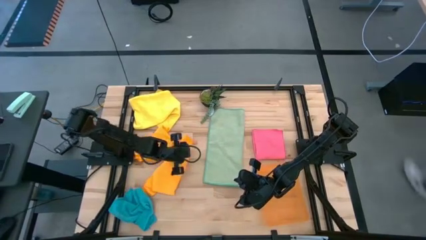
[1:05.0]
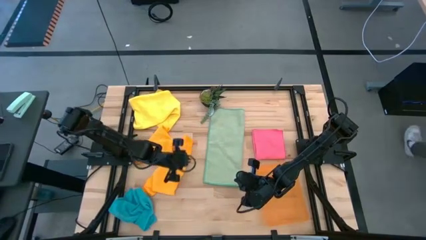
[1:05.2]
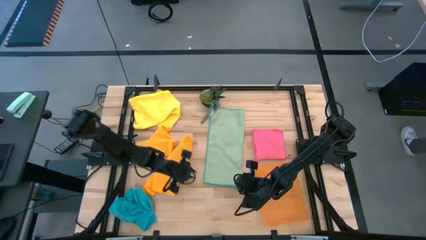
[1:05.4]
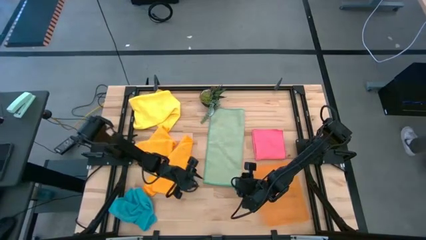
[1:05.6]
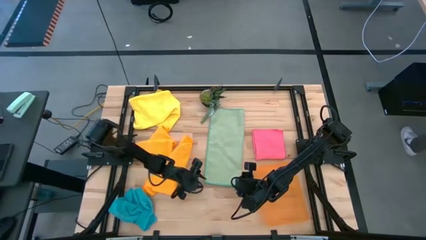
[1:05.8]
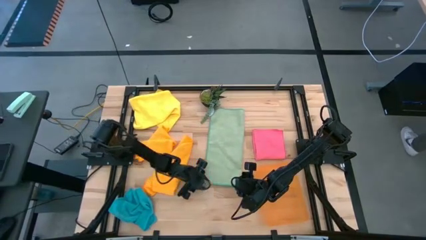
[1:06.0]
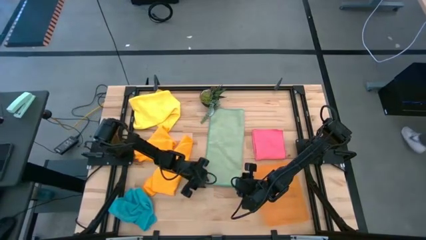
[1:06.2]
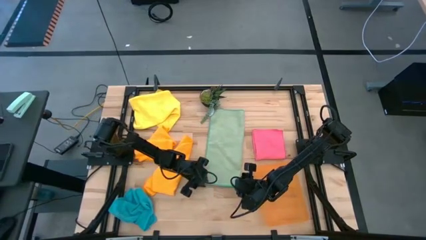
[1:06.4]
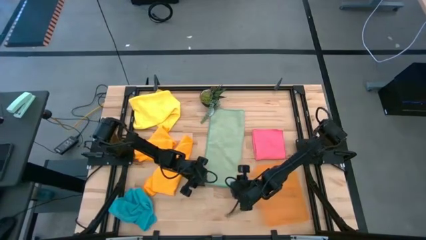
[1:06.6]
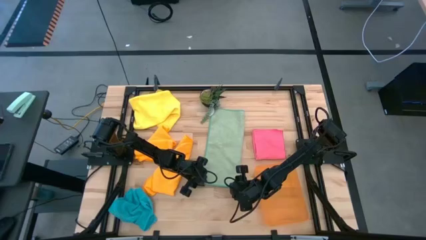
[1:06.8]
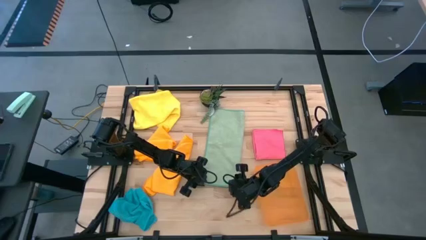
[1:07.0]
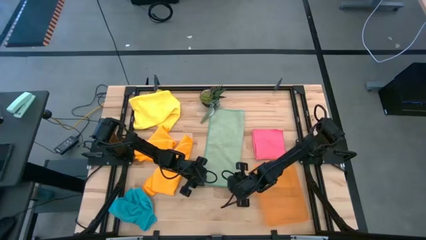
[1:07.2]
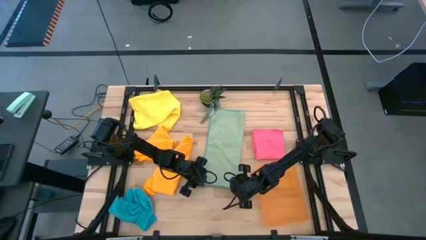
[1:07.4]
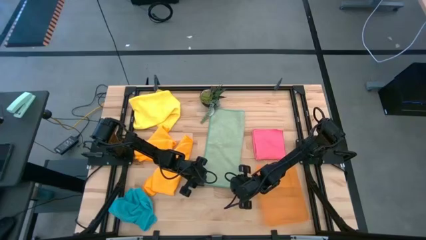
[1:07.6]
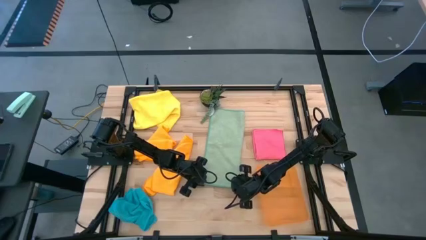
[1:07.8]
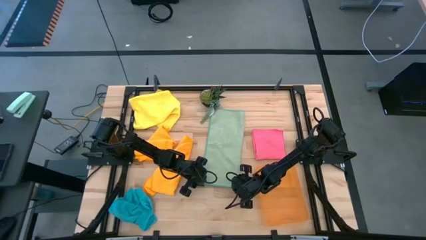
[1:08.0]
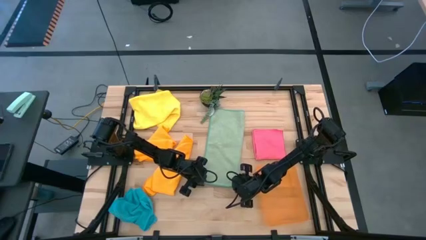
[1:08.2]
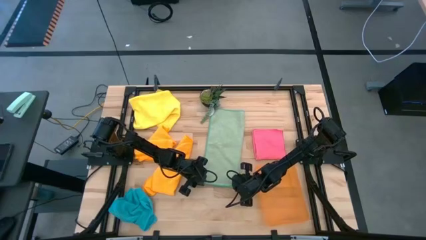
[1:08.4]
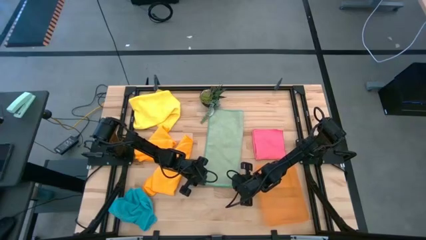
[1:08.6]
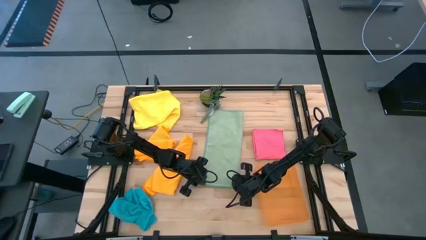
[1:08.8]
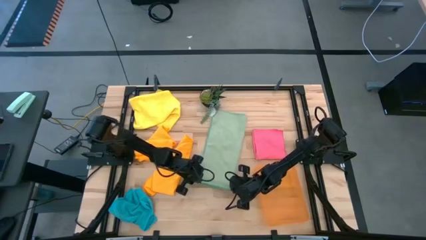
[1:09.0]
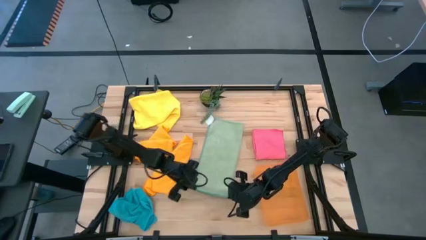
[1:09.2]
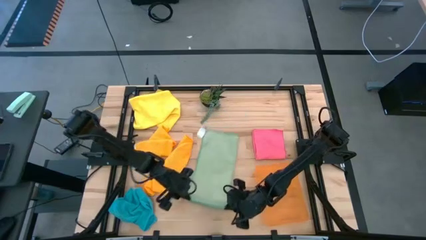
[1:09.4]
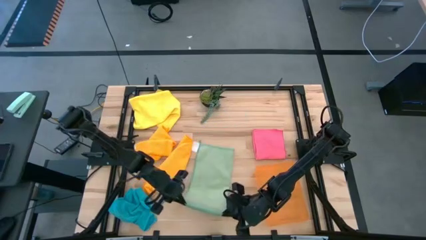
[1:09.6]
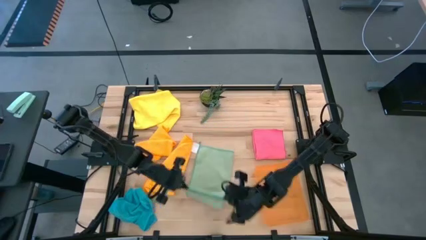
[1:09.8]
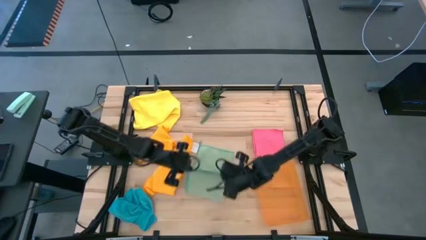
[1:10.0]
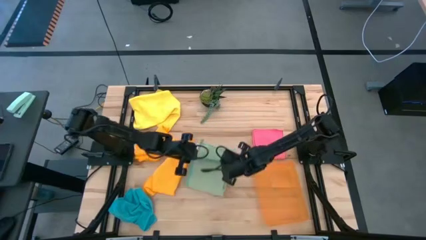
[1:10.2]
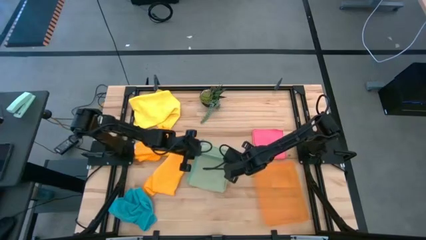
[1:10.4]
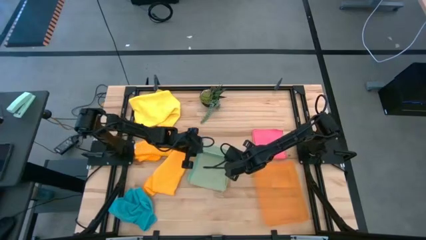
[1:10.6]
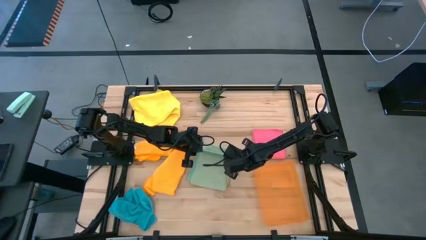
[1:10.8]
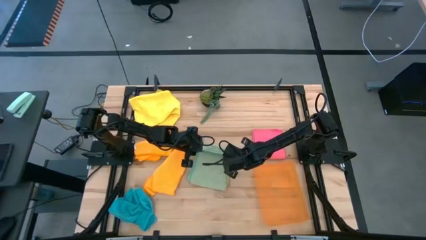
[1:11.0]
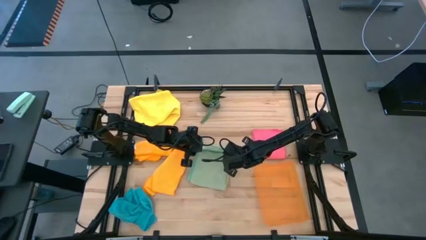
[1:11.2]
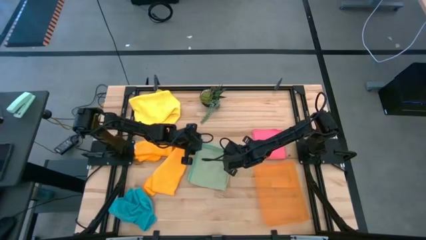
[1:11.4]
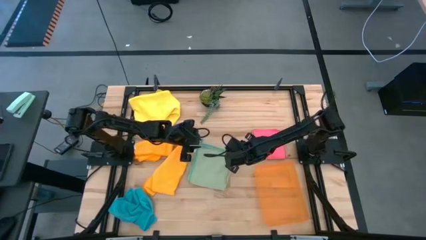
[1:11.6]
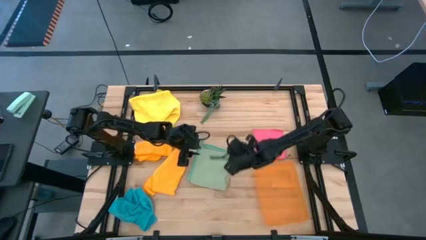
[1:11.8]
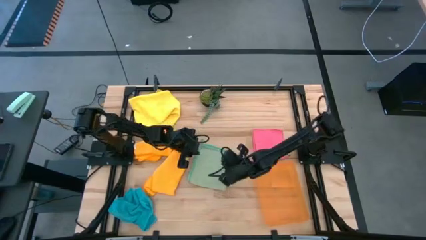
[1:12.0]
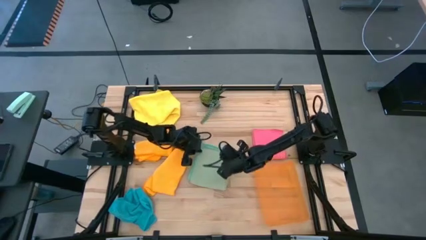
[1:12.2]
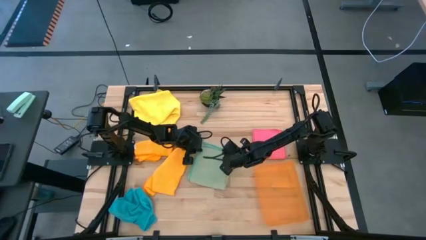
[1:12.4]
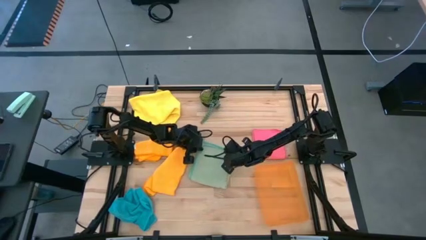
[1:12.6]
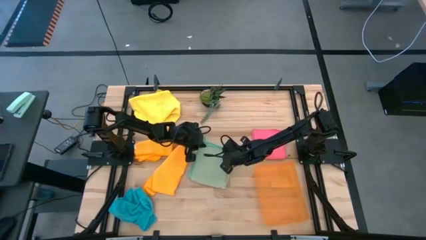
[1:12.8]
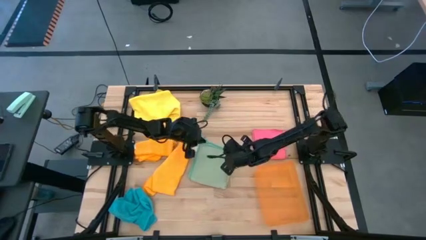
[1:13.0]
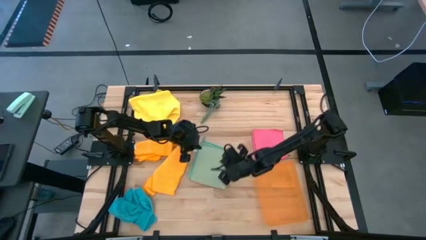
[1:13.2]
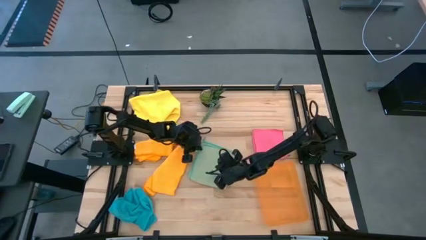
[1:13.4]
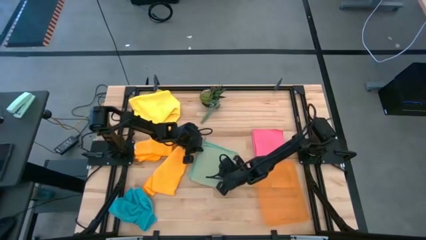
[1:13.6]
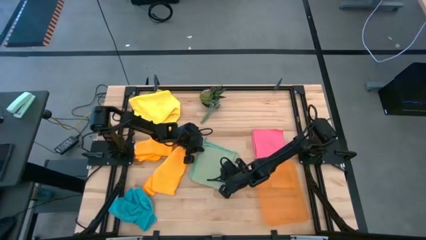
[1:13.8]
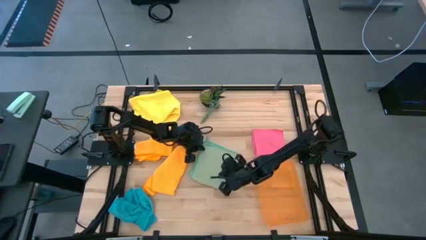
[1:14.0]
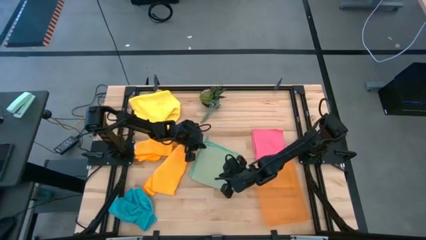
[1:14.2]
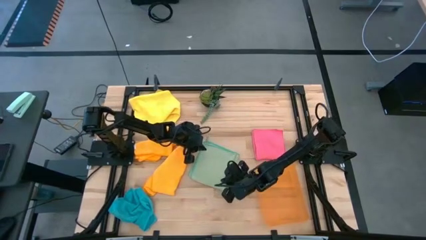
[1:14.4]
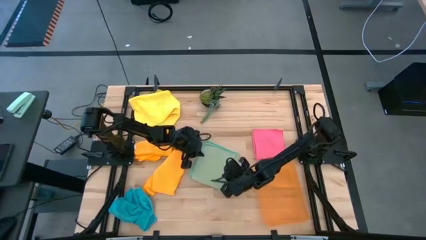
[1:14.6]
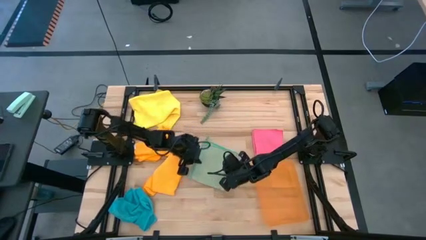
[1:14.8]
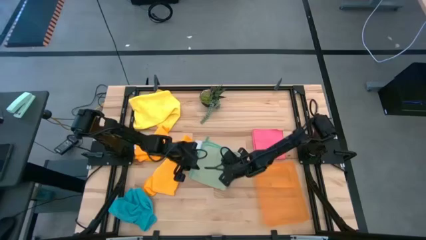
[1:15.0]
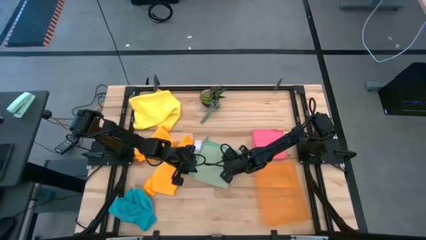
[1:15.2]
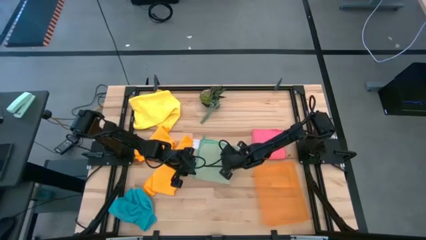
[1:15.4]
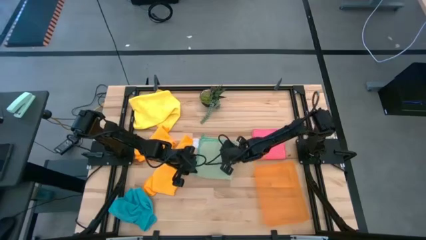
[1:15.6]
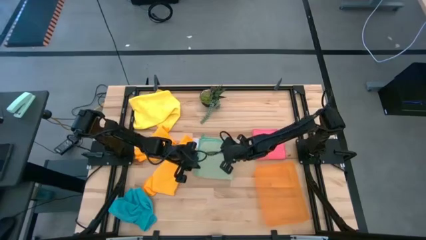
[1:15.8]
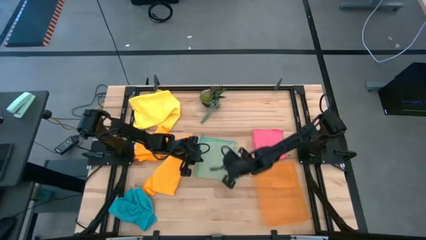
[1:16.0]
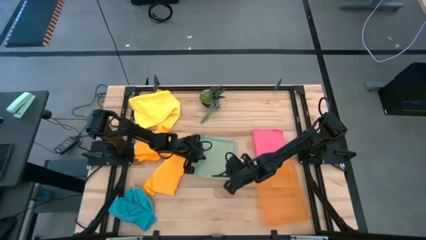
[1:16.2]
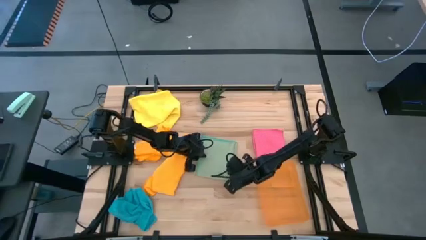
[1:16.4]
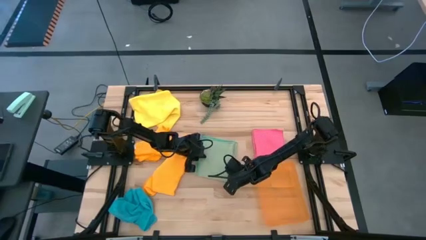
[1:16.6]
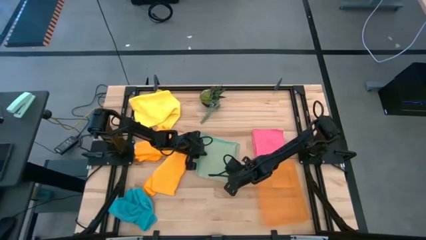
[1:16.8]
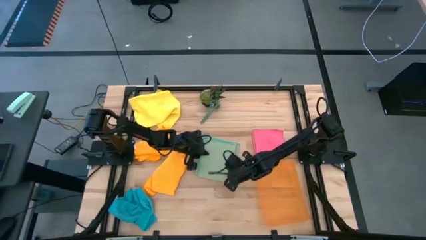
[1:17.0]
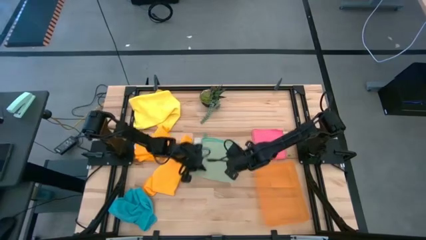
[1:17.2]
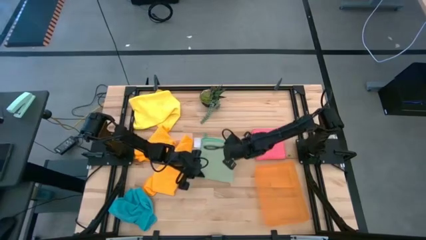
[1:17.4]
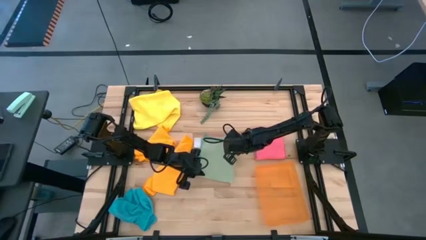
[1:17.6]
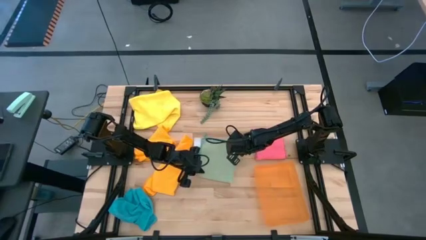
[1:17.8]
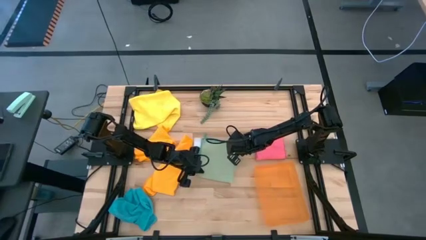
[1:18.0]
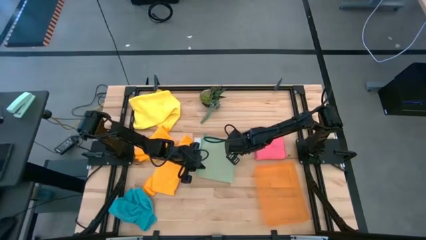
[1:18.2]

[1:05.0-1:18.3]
Task: Fold microfiber towels
Fold the green microfiber towel

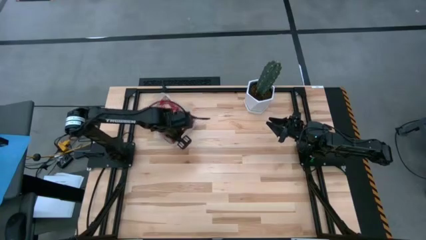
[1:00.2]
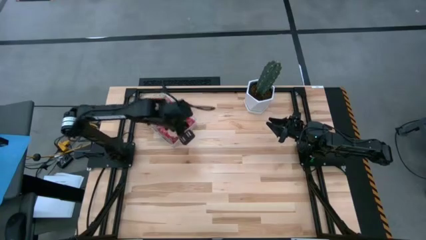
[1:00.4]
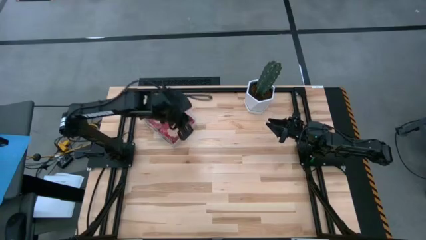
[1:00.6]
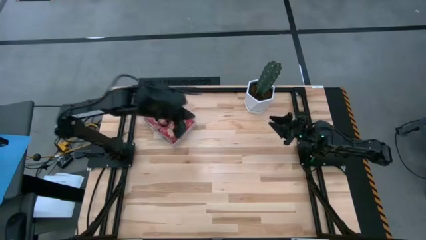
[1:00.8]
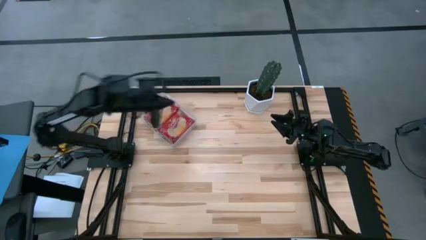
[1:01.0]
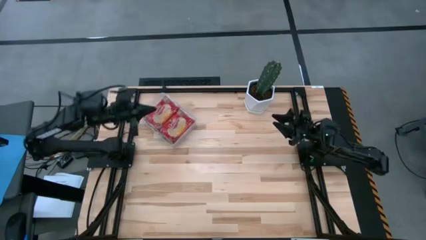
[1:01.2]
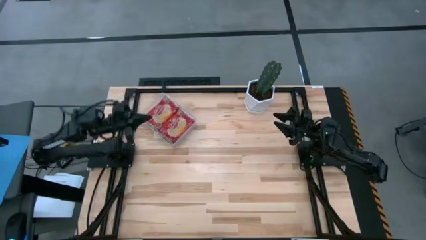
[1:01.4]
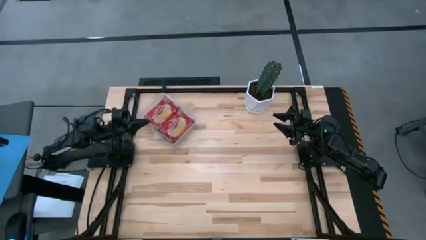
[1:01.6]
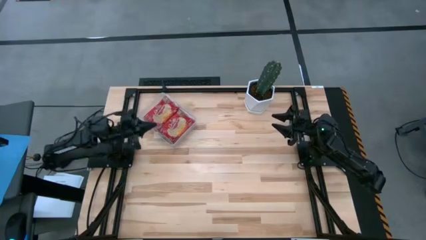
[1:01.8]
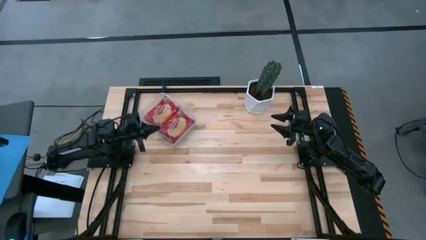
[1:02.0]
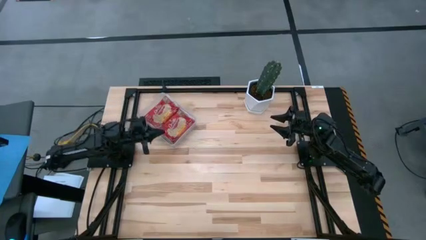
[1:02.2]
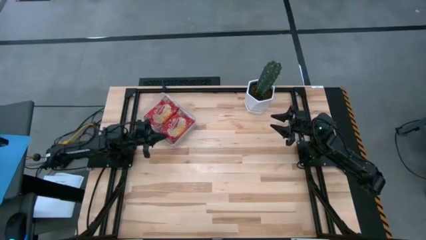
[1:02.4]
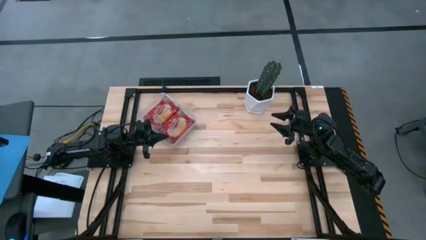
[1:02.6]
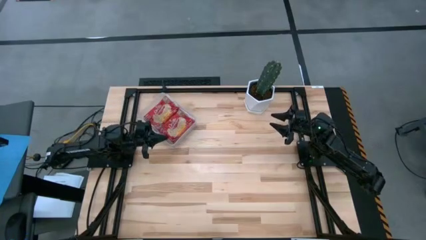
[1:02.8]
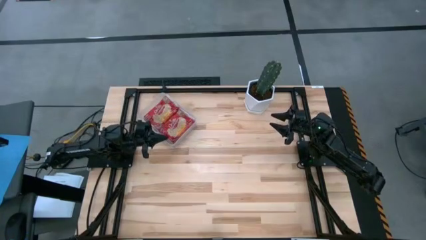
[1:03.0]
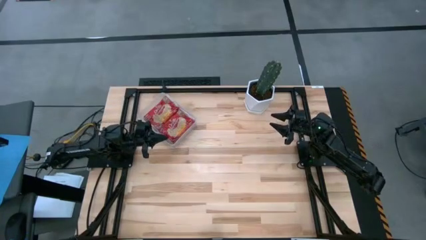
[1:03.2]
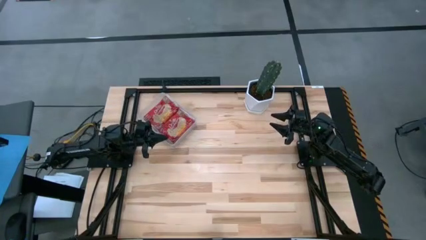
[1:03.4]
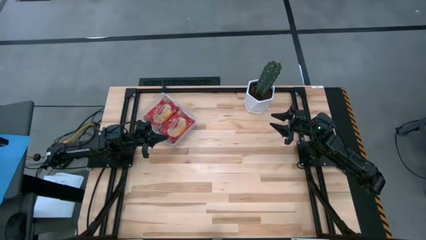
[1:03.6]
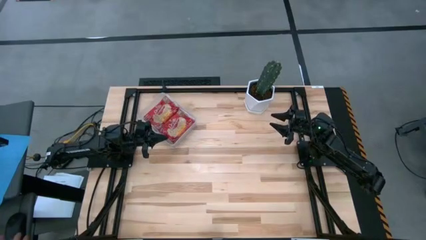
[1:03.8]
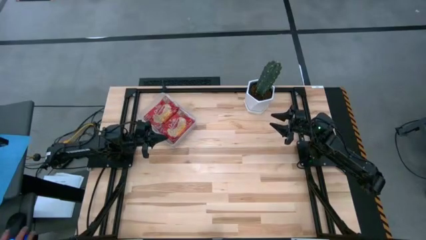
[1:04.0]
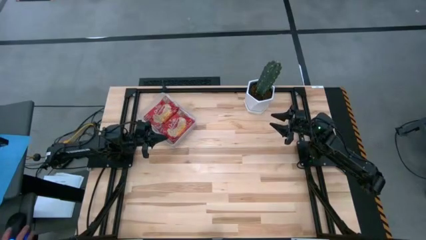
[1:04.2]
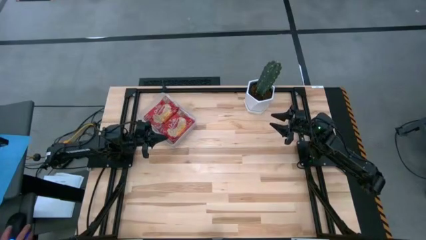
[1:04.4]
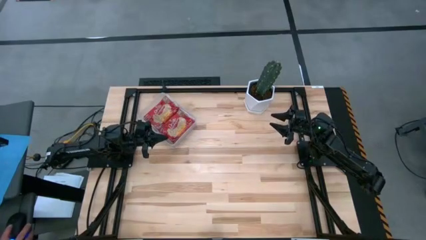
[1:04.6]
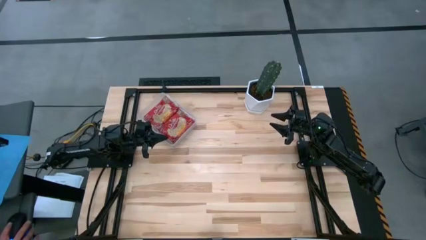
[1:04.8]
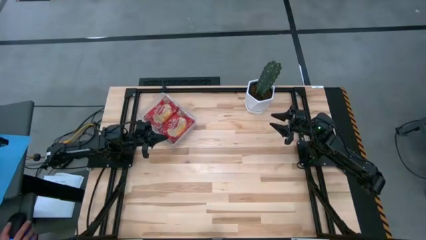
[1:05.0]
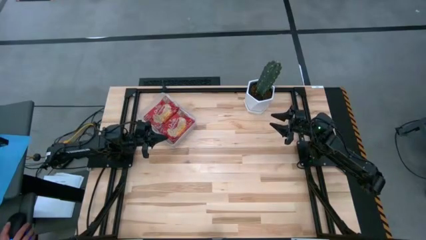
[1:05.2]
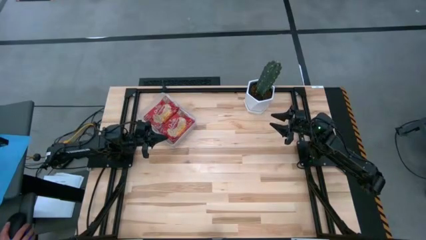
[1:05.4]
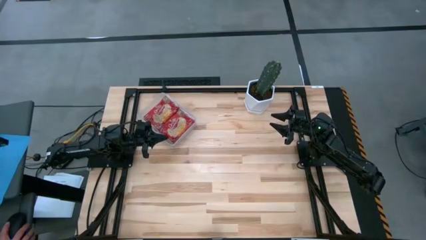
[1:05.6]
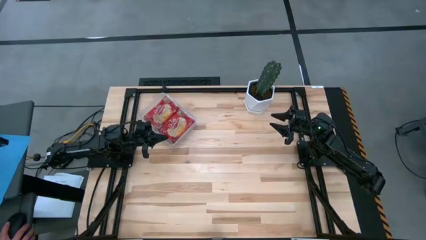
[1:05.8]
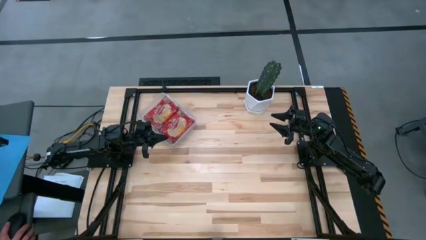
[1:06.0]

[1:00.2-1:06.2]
Task: Sort popcorn bags into baskets
Return to Home Position
